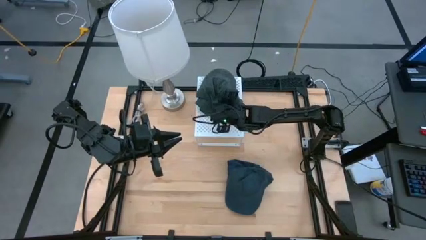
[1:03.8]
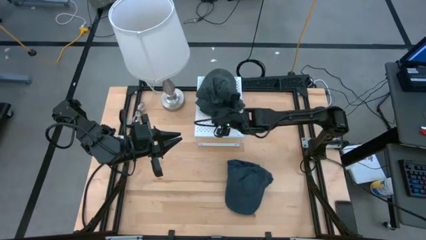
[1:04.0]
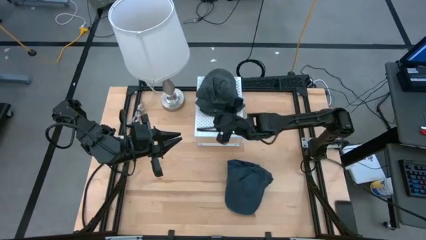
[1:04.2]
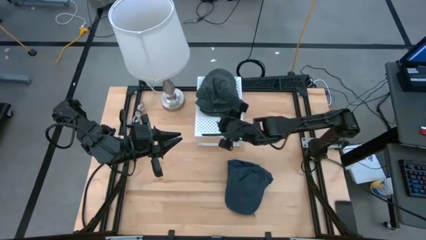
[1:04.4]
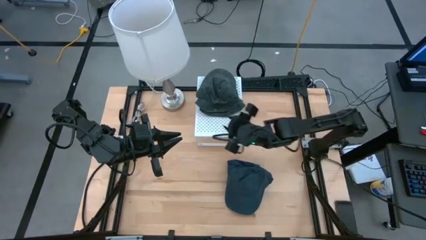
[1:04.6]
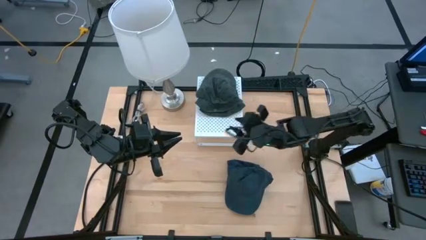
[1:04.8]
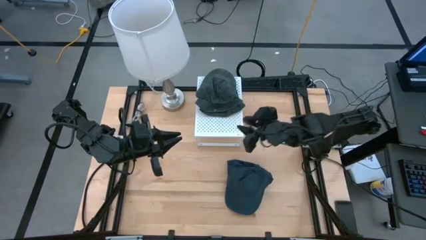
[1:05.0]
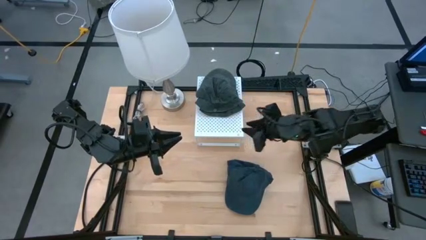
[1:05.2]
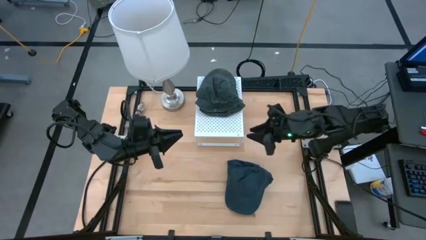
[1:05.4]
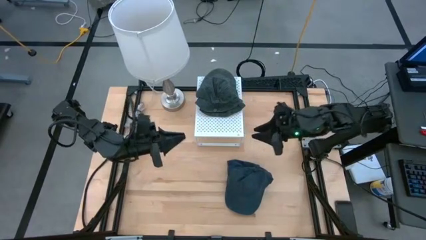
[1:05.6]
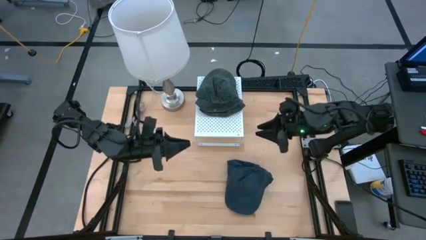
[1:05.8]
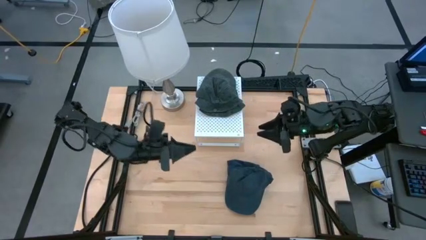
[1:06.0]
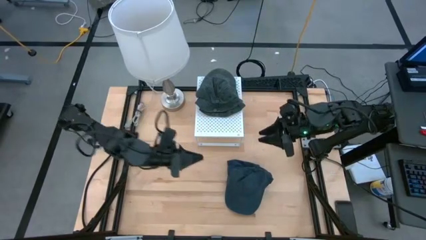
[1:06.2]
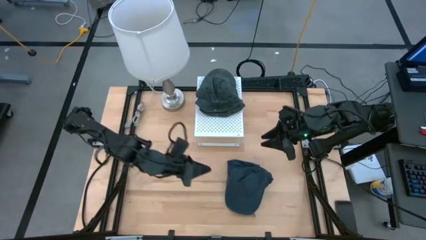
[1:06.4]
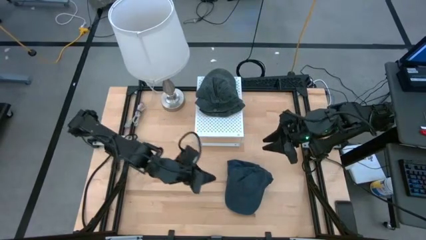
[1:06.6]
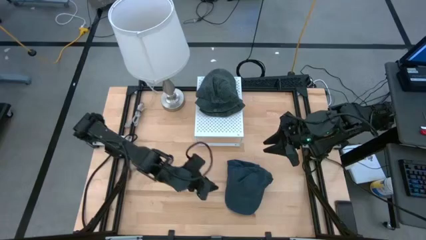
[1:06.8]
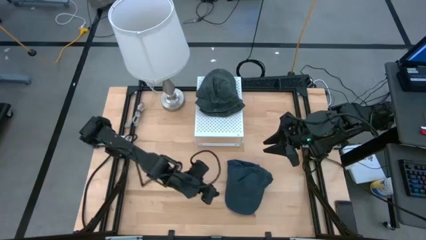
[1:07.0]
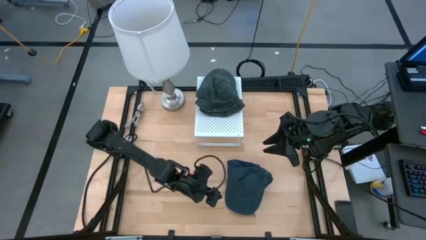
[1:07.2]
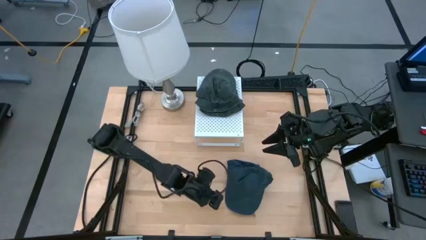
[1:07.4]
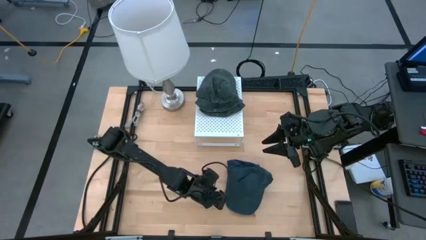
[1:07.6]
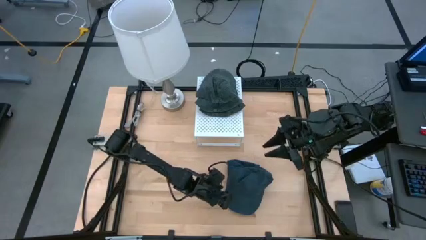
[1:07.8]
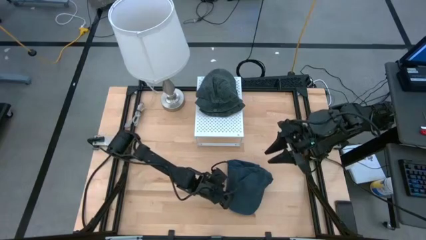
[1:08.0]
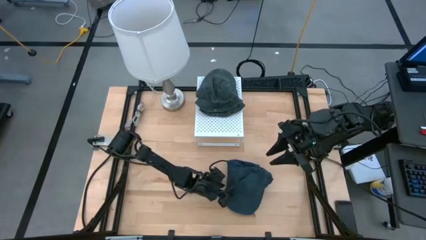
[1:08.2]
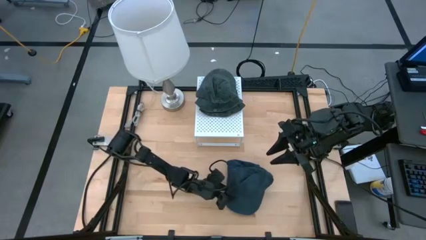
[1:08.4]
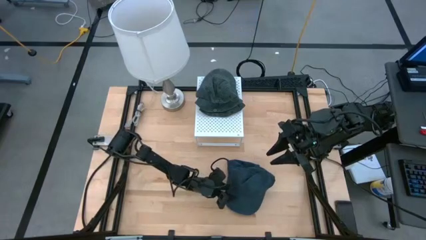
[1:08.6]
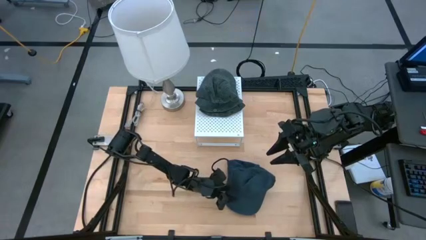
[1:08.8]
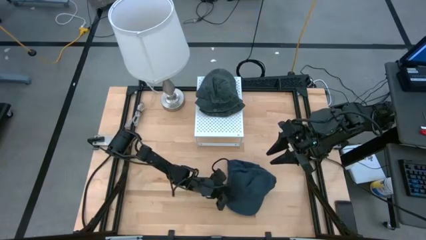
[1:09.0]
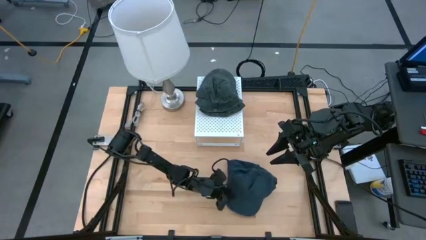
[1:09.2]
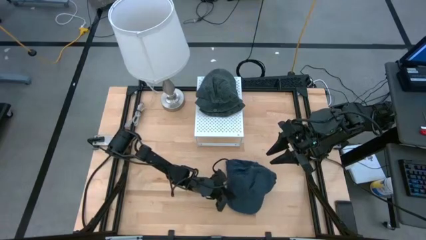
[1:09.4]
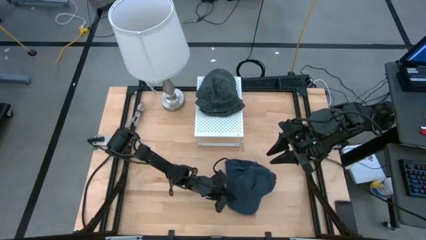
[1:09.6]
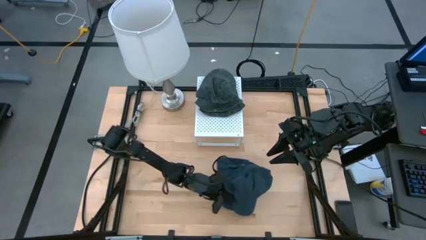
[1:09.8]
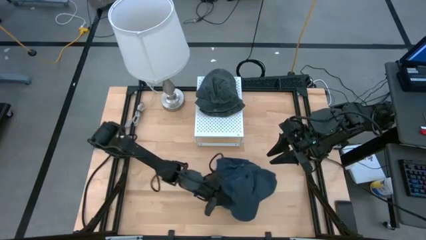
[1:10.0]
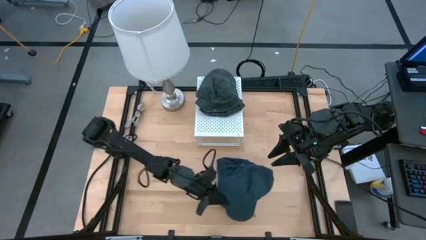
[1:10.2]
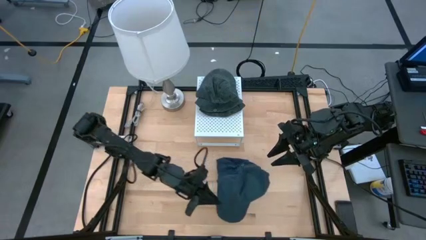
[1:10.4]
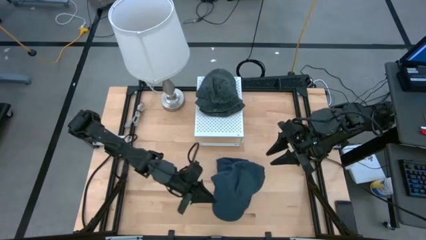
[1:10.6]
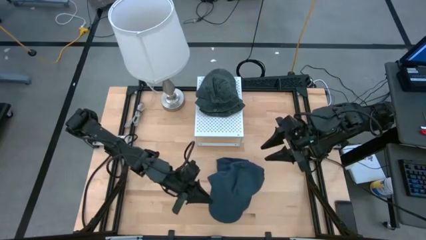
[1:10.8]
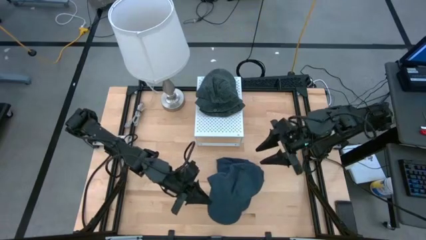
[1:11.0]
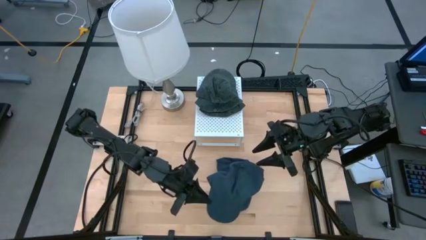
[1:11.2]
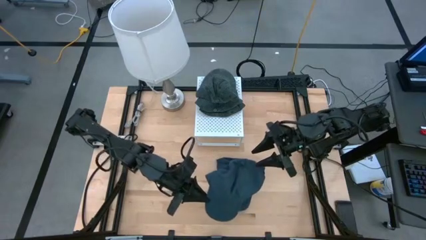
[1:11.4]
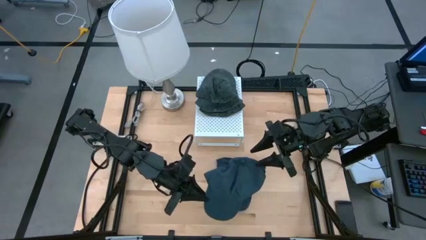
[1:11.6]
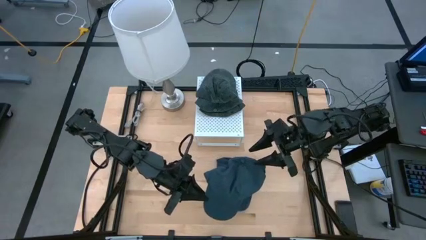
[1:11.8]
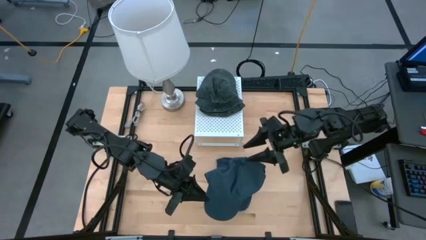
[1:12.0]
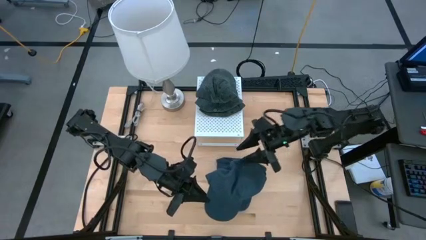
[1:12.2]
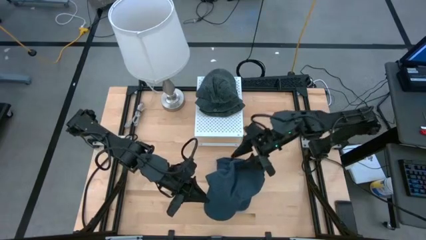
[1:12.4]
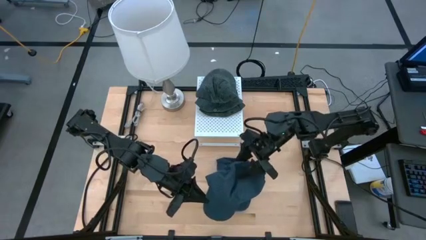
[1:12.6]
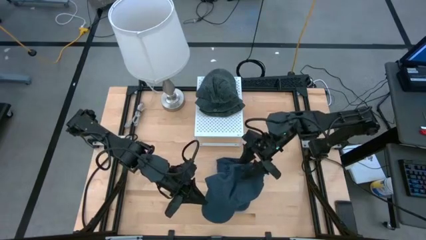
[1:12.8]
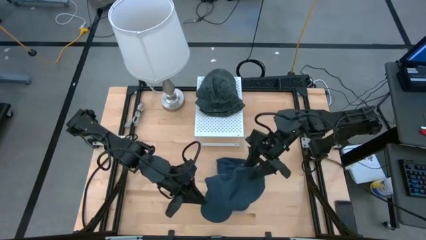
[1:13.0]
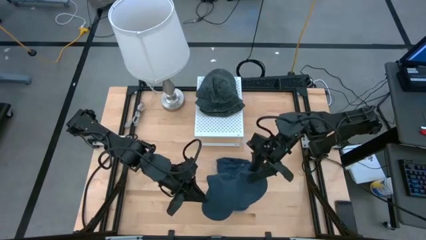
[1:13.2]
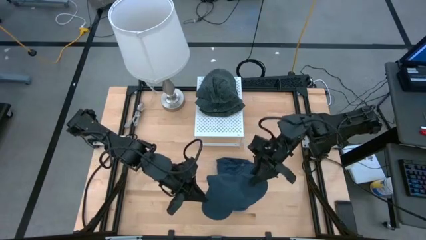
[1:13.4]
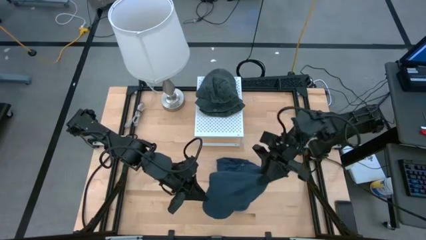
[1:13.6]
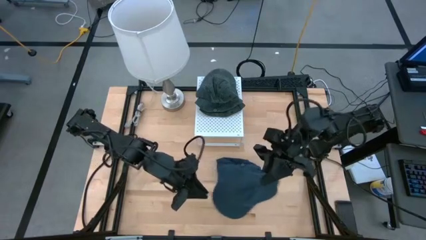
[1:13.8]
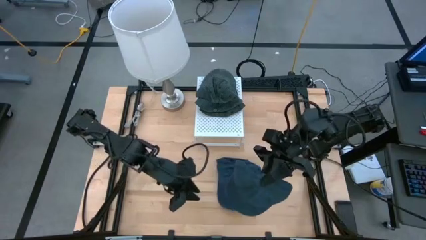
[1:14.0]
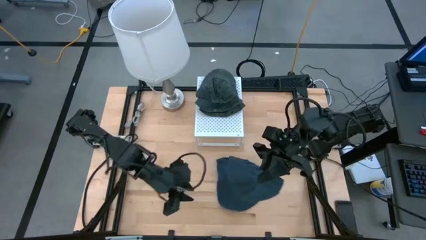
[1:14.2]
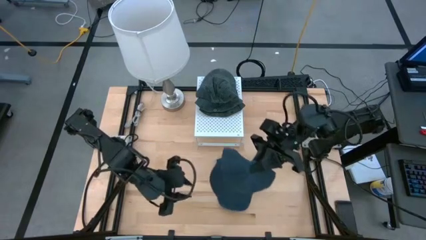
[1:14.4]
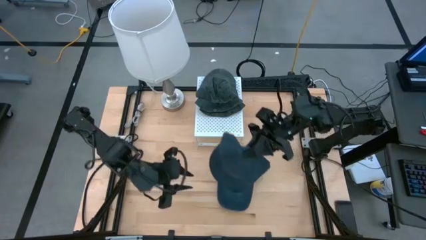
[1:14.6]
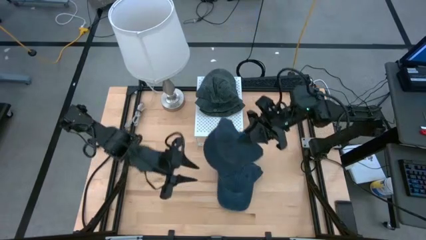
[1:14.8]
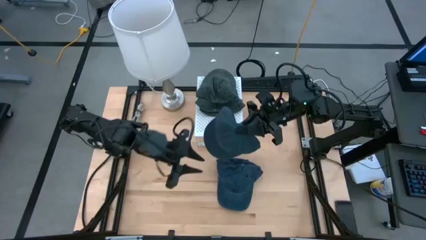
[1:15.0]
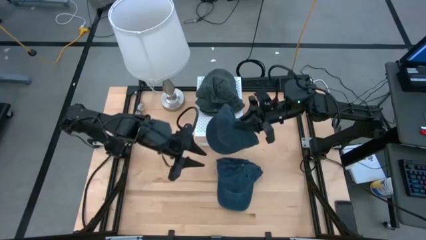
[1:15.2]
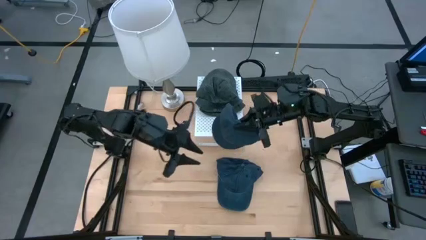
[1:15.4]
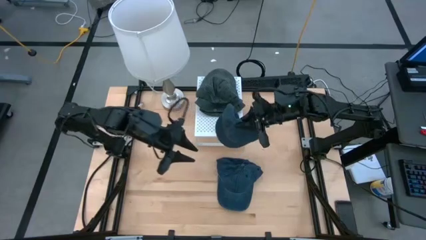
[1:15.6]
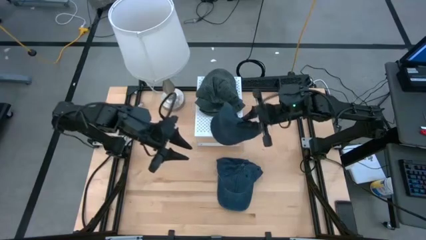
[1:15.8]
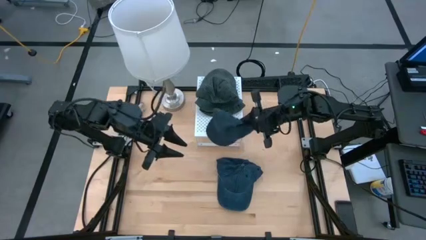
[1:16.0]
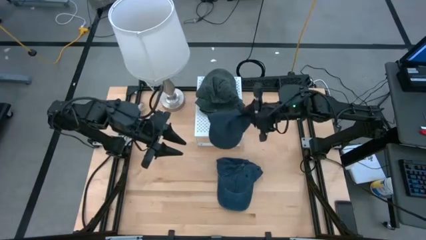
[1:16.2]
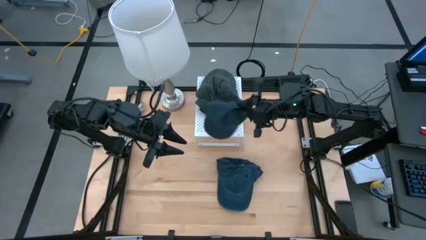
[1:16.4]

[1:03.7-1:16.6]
Task: Pick & Place hat
Put the blue cap on the shelf

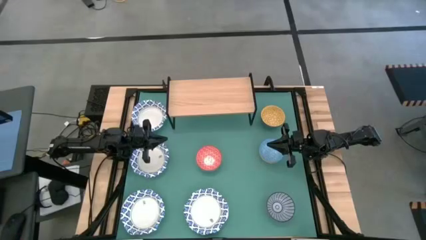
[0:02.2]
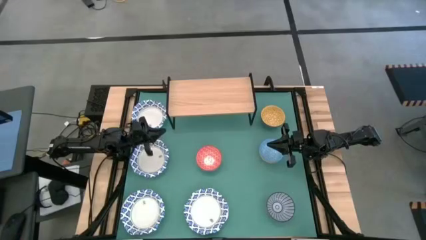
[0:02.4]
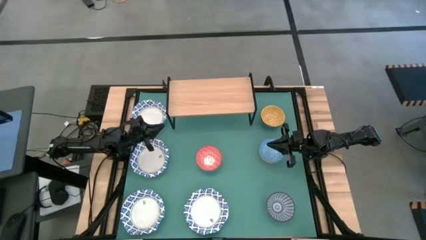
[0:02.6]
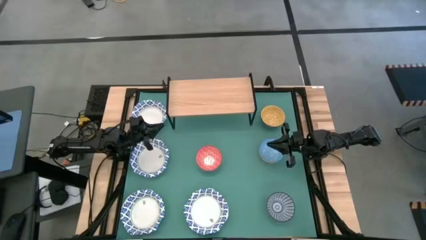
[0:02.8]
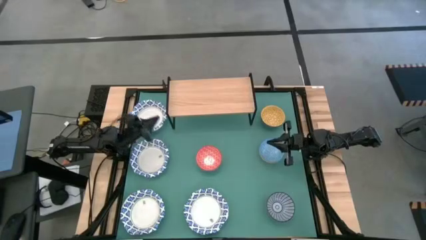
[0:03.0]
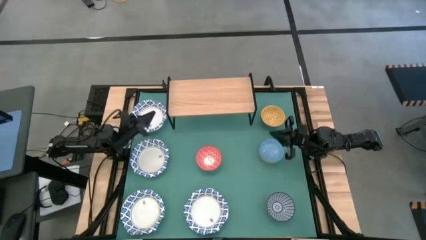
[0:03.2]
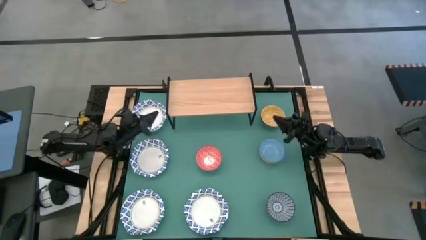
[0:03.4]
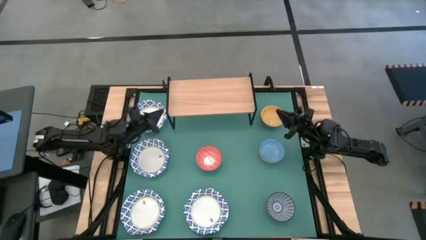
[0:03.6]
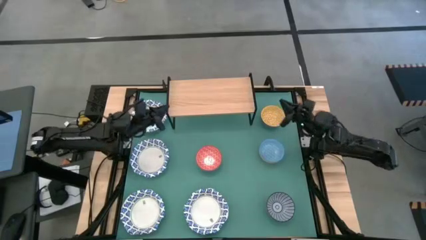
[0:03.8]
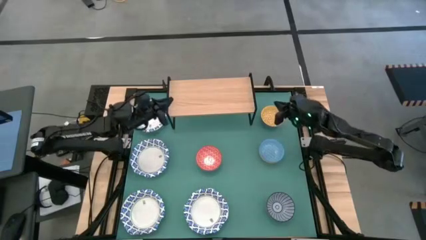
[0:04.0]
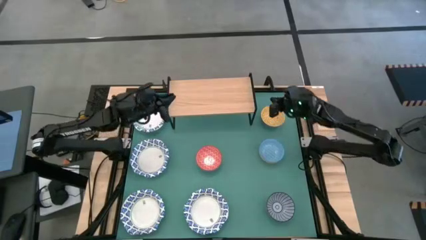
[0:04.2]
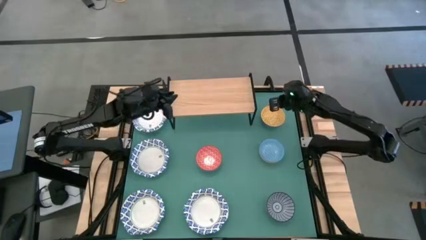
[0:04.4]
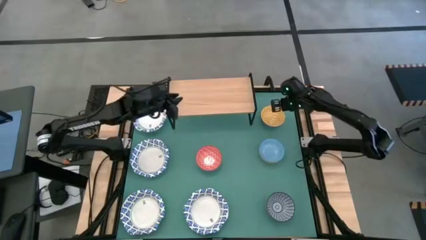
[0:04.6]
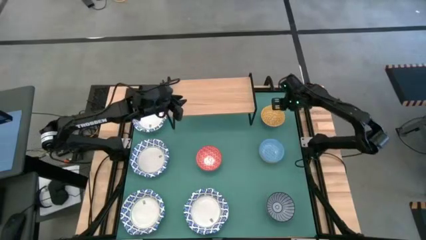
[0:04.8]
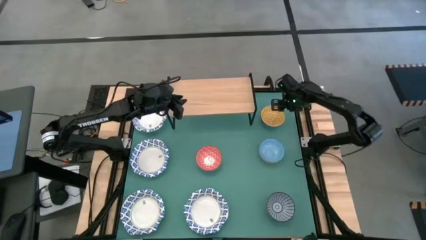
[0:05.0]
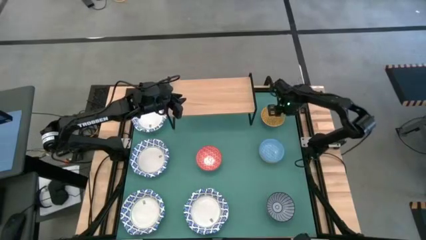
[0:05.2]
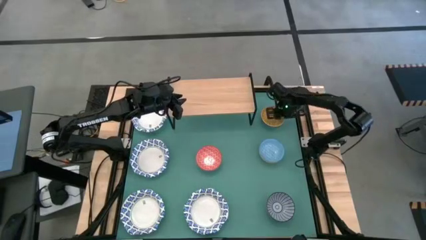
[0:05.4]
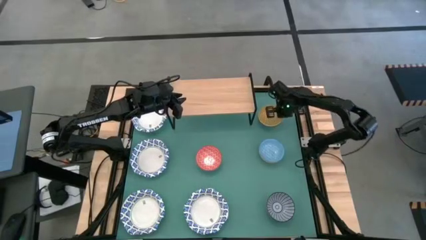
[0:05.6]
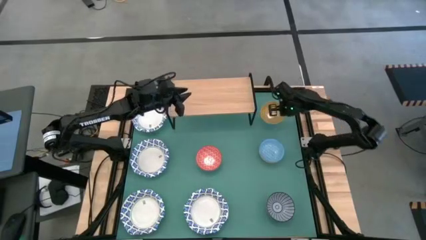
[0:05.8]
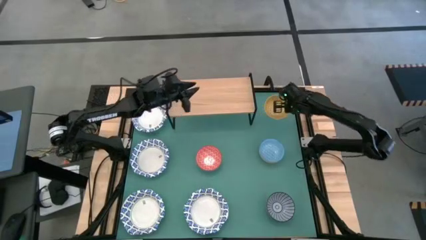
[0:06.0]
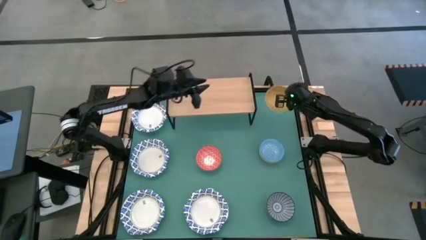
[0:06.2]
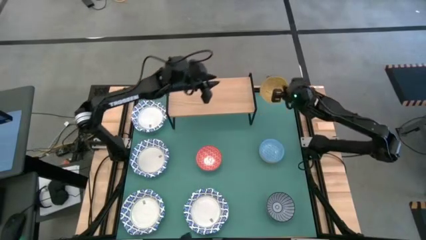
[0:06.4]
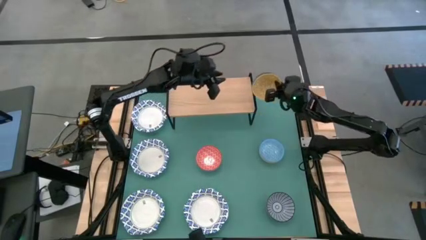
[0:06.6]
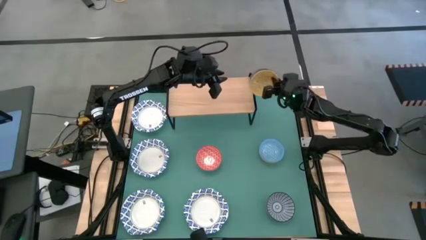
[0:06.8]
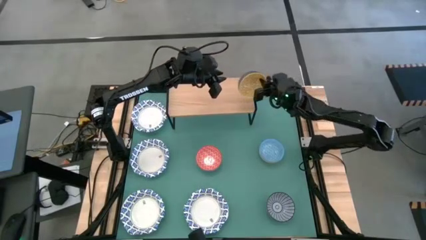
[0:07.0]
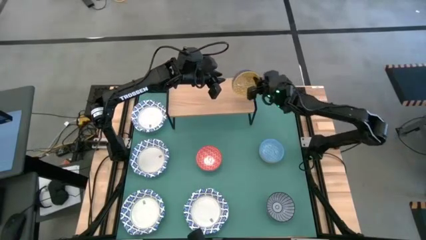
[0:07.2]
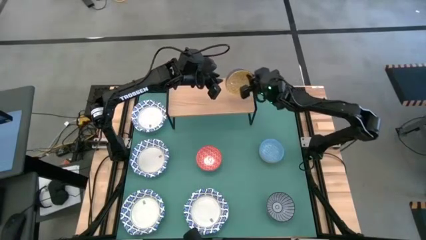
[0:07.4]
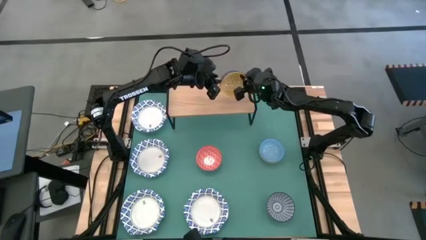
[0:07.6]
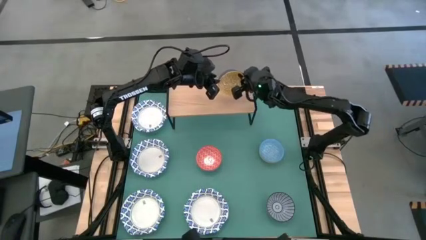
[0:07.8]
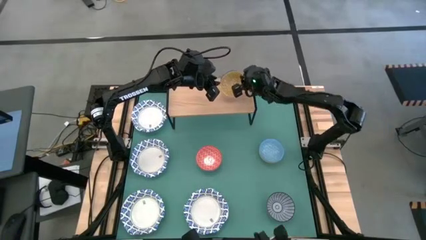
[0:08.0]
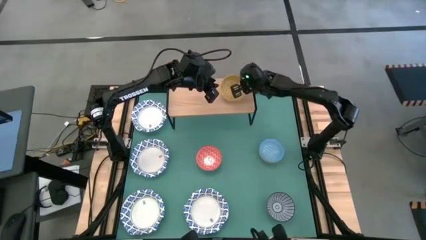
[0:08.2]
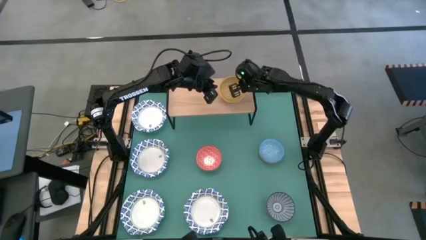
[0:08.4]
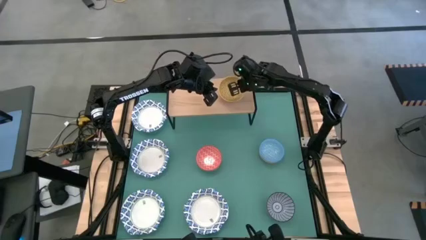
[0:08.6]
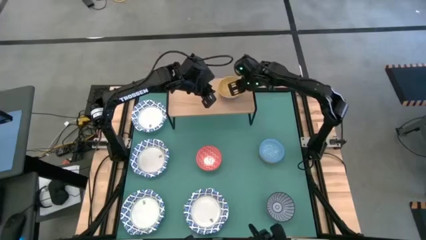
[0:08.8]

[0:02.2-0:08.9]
Task: Place and stack bowls onto a shelf
Put the small yellow bowl on the shelf
